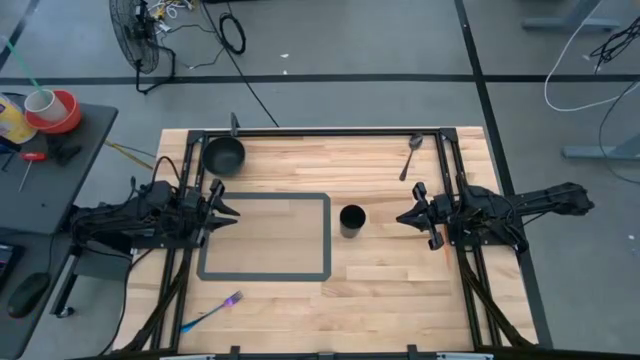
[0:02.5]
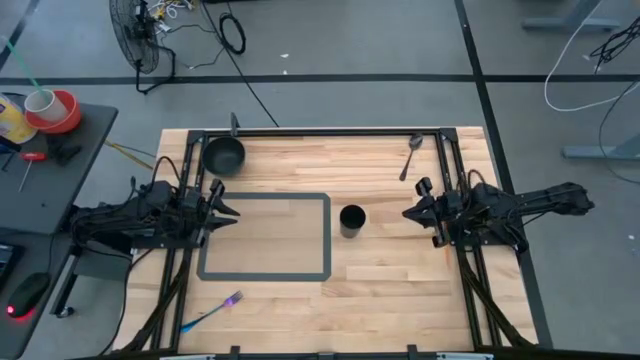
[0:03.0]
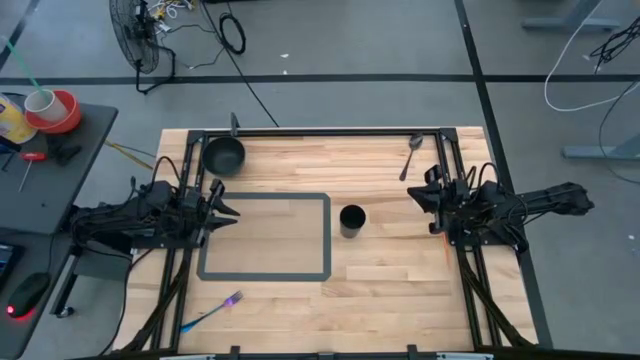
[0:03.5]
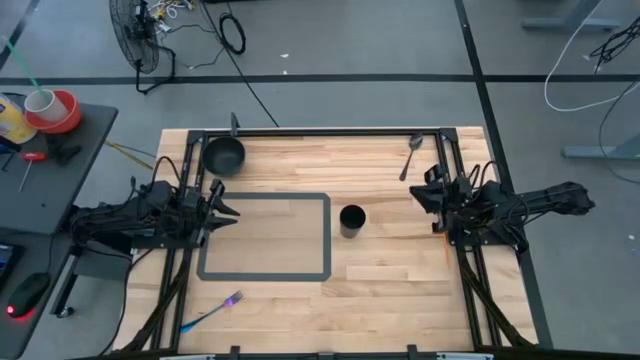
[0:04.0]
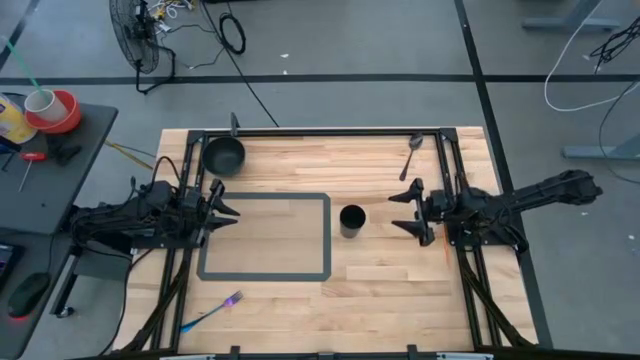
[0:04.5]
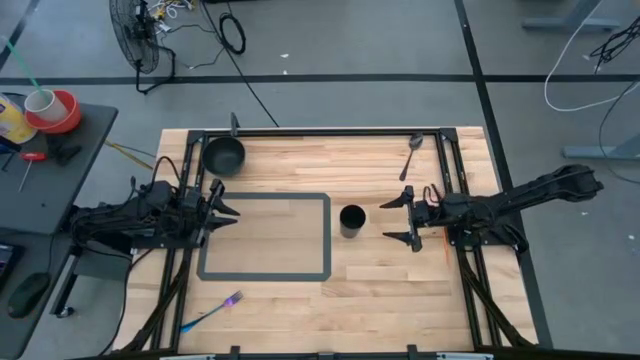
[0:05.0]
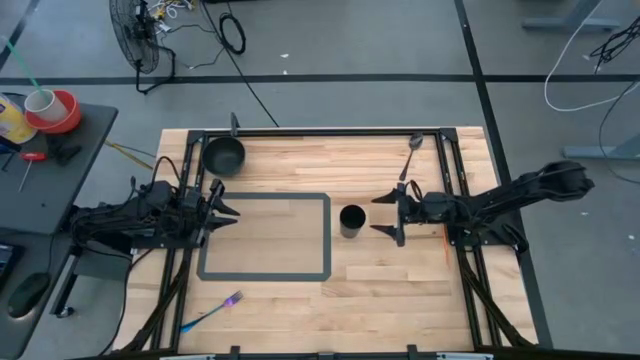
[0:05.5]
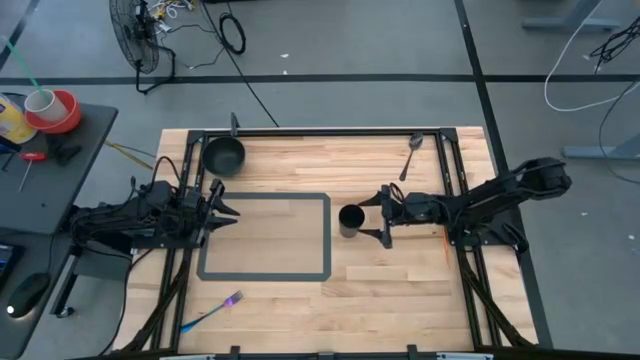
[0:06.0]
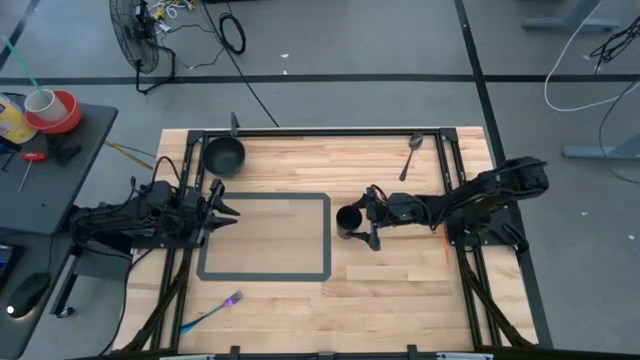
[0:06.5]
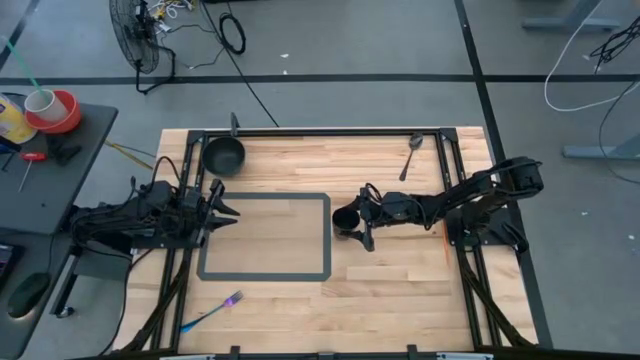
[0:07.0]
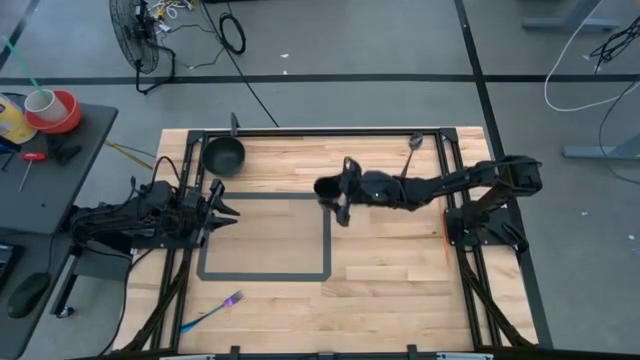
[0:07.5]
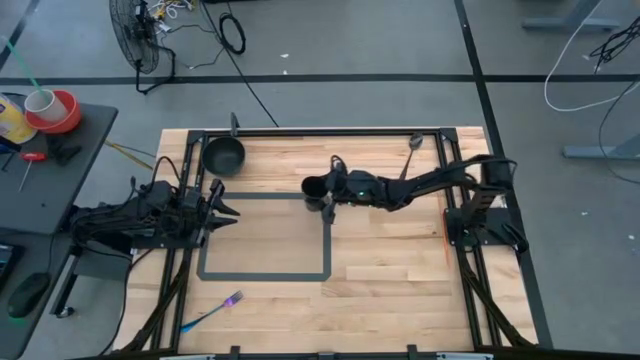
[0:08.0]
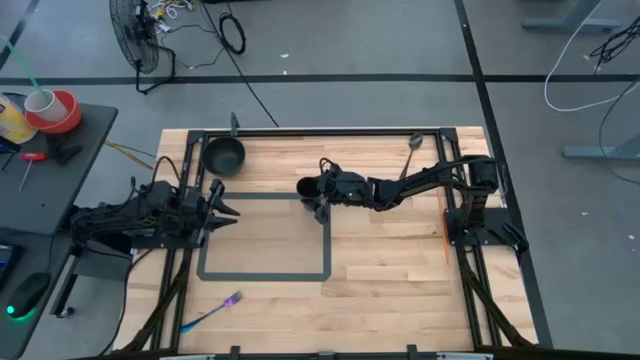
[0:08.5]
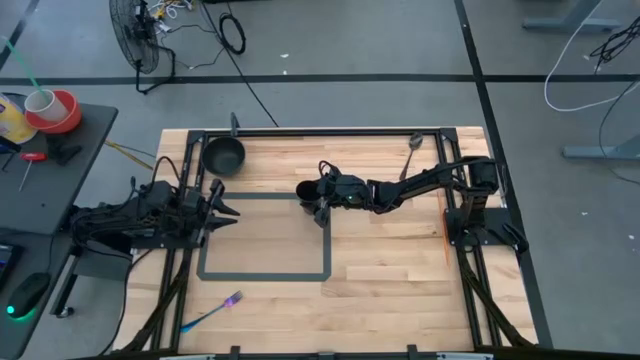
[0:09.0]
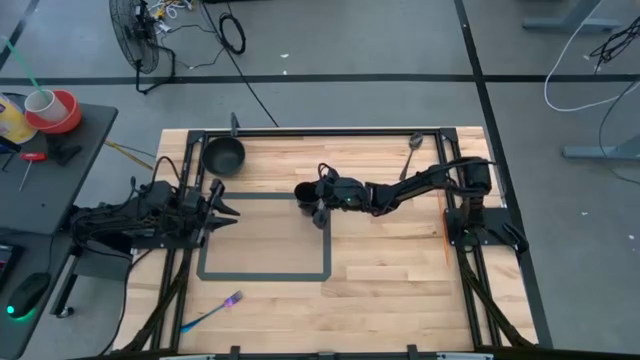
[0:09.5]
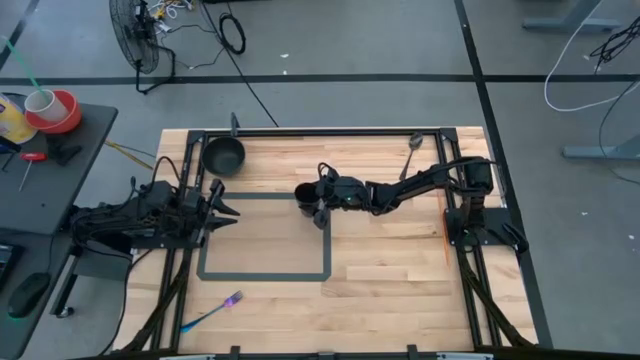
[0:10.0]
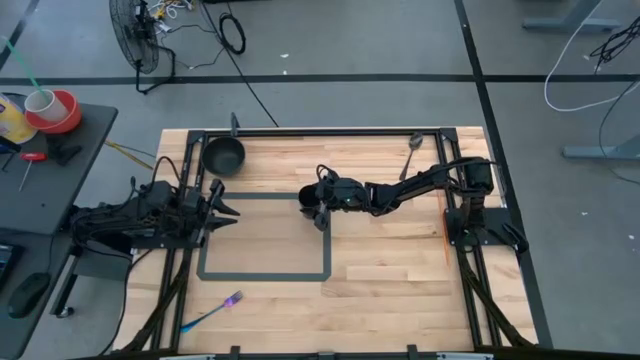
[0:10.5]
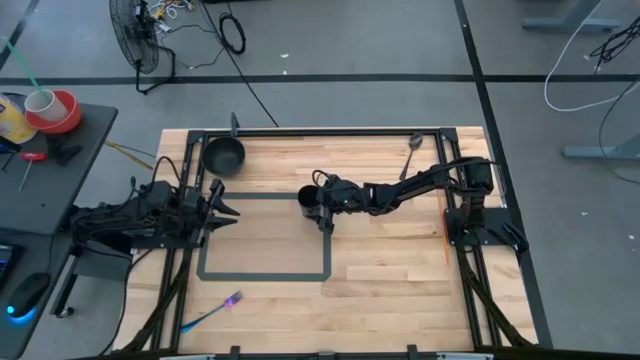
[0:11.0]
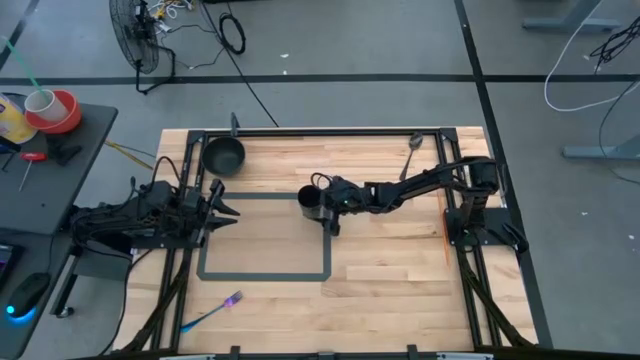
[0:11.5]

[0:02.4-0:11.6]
Task: Pick & Place Utensil
Put the black cup on the gray mat

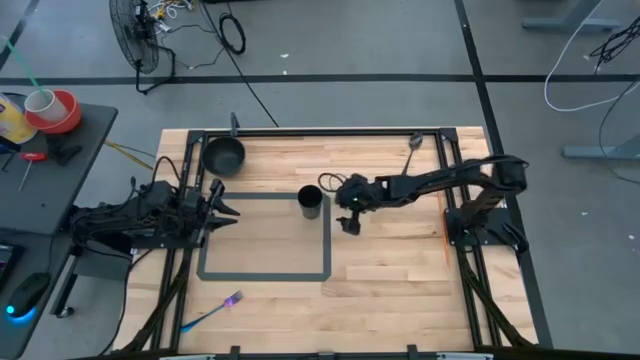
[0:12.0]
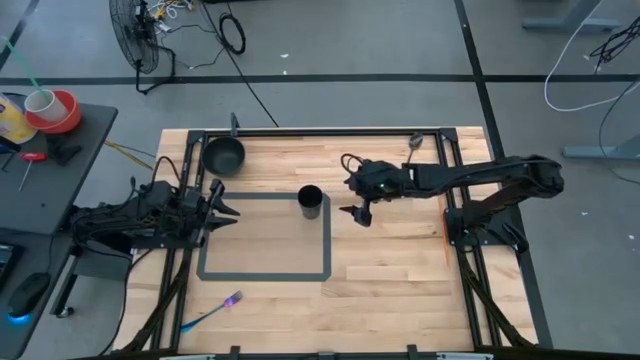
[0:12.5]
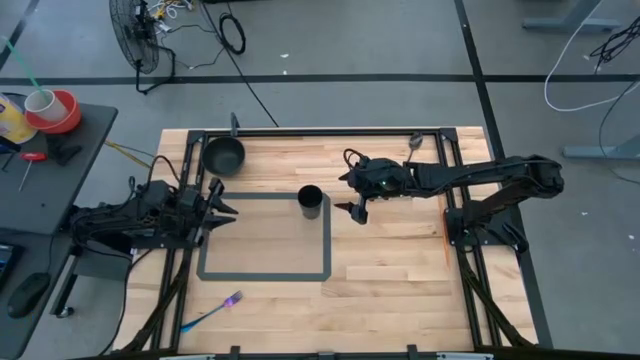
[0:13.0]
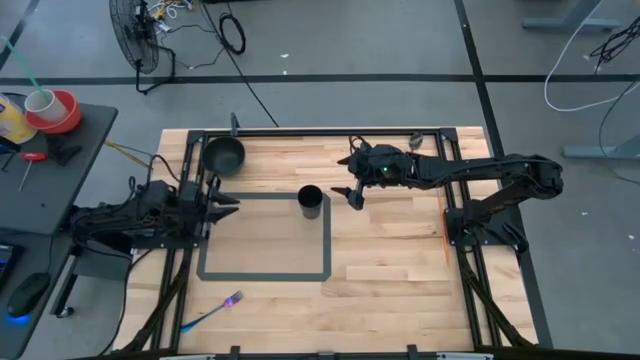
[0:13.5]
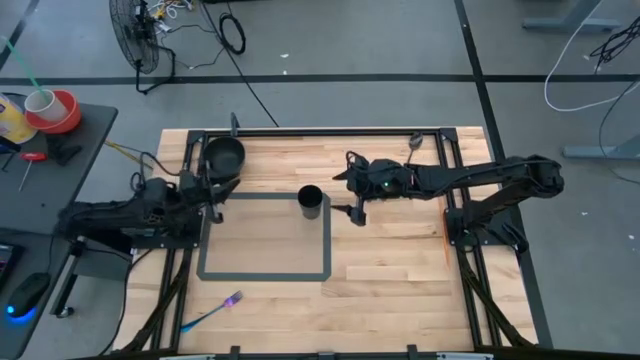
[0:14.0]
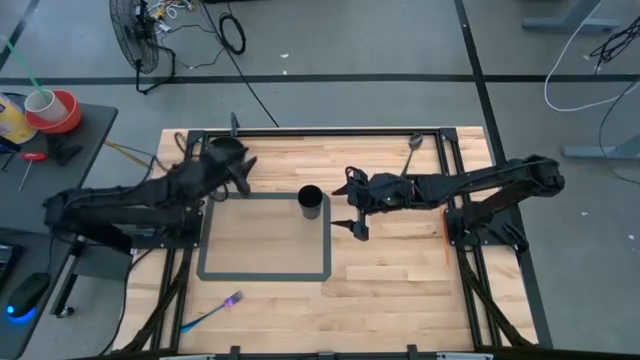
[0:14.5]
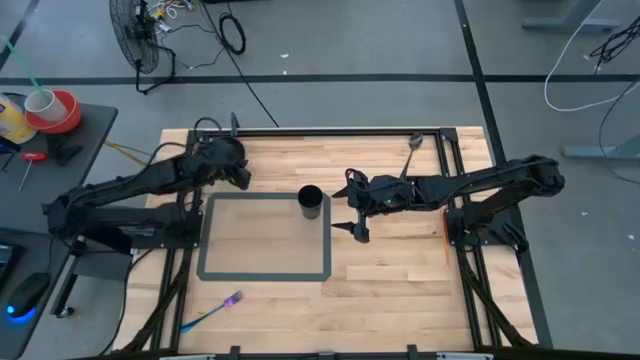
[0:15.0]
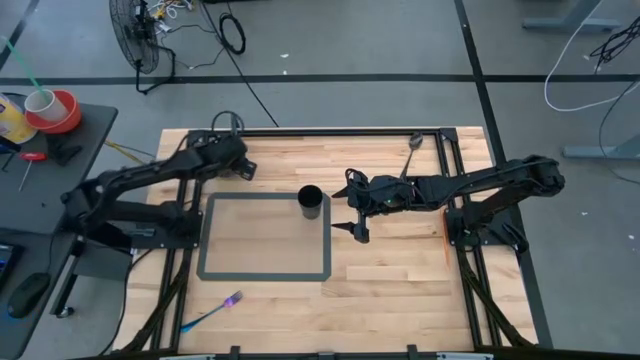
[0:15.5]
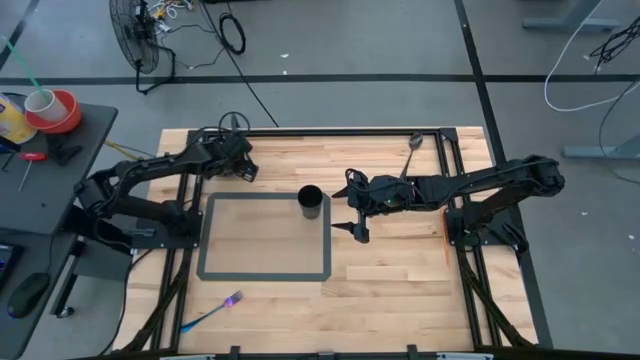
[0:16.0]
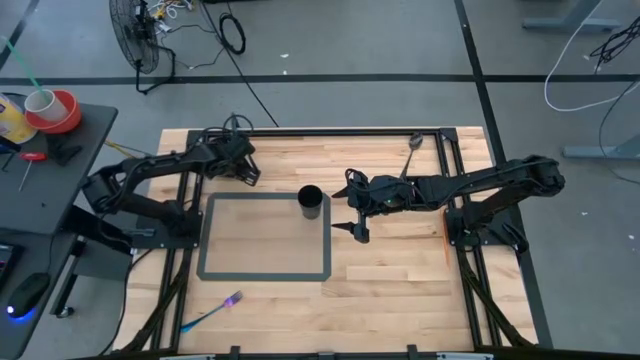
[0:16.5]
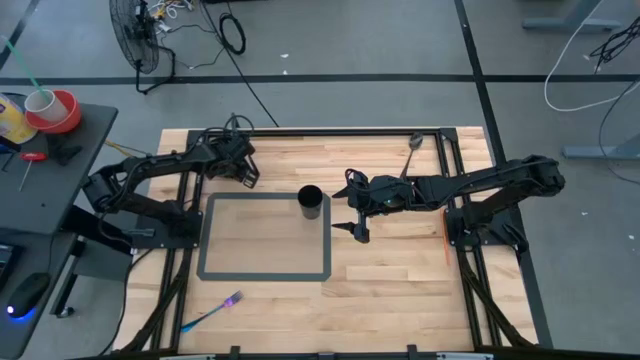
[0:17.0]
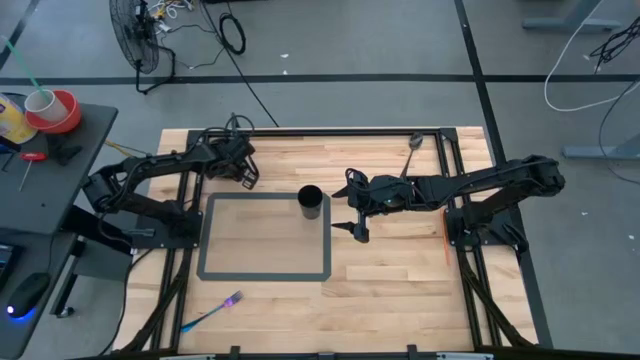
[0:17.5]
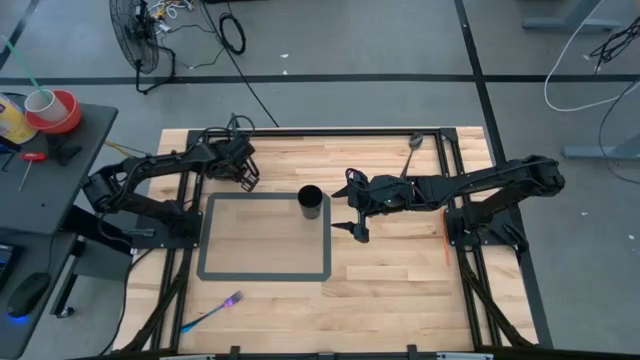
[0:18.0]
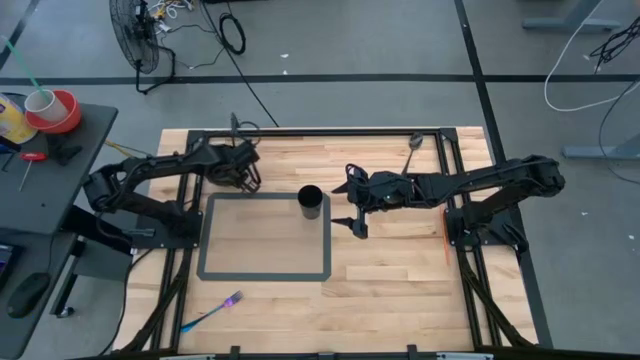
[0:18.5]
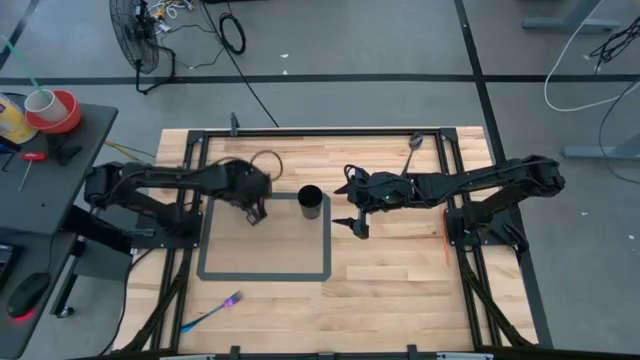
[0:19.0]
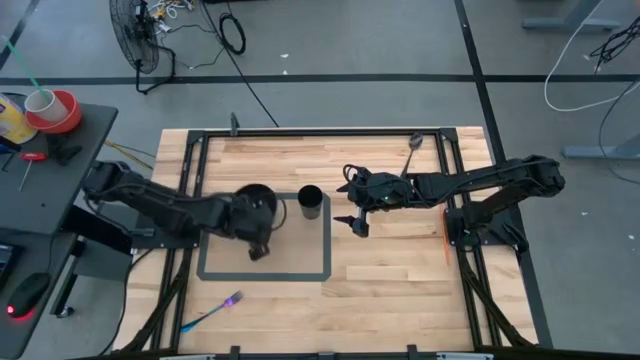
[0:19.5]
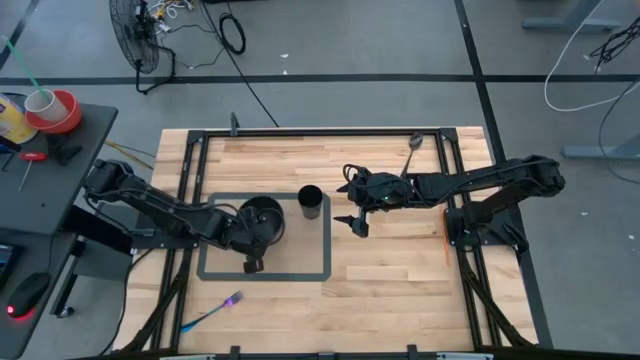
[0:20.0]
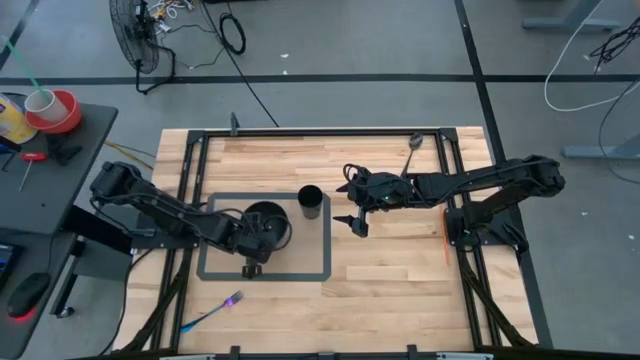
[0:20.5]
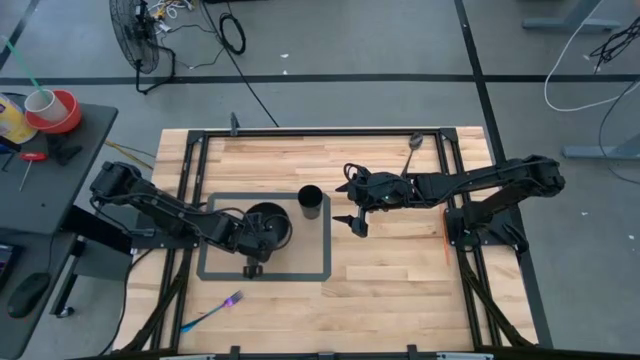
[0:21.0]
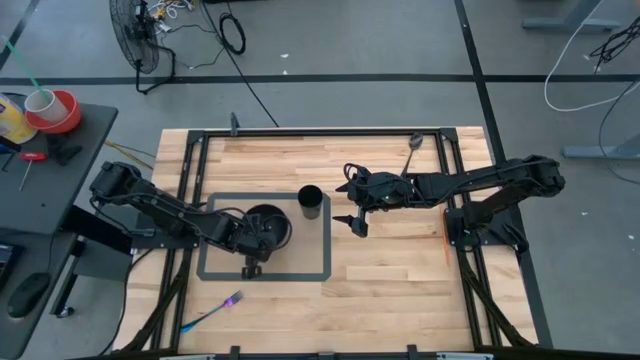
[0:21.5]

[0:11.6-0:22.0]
Put the black bowl on the gray mat
